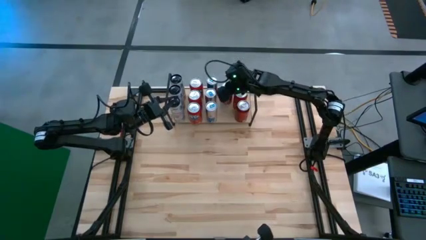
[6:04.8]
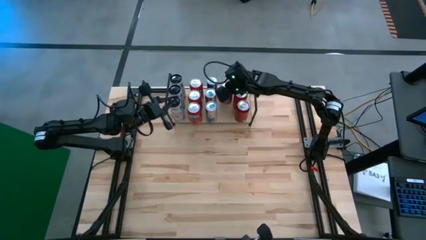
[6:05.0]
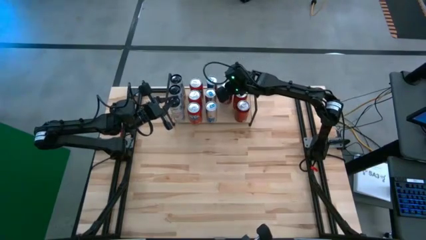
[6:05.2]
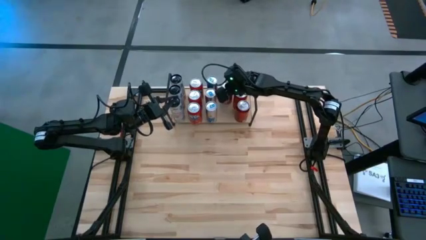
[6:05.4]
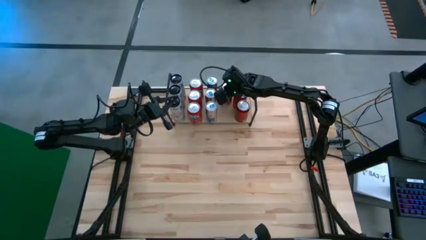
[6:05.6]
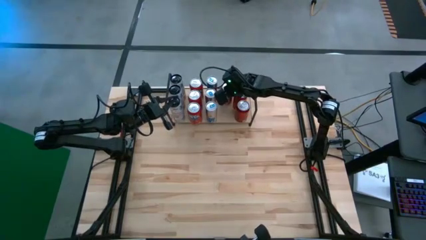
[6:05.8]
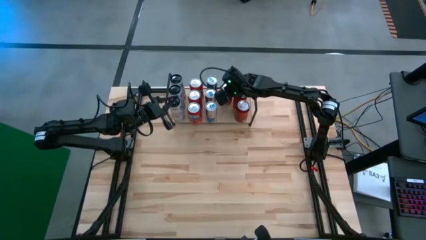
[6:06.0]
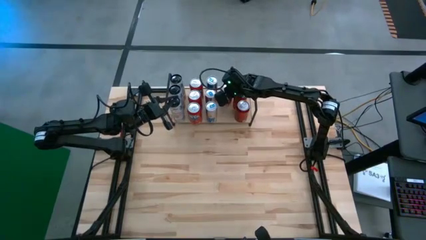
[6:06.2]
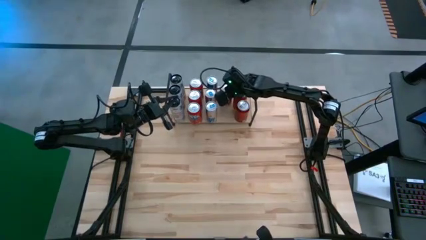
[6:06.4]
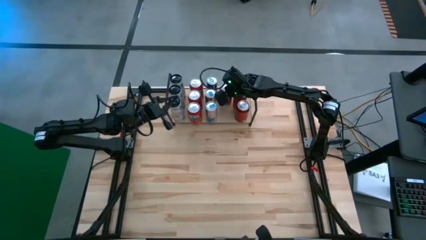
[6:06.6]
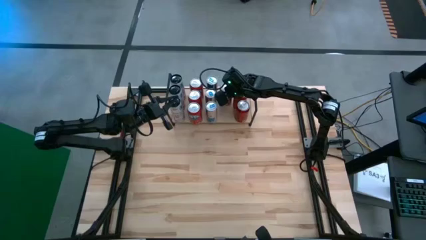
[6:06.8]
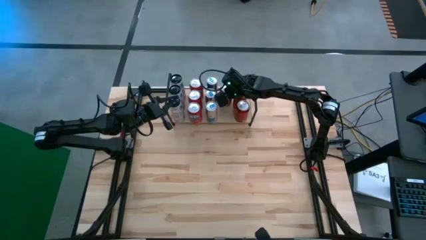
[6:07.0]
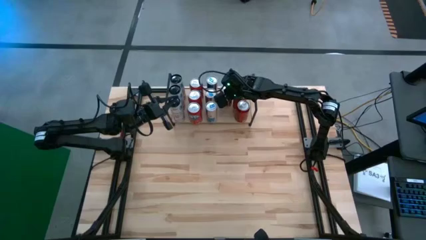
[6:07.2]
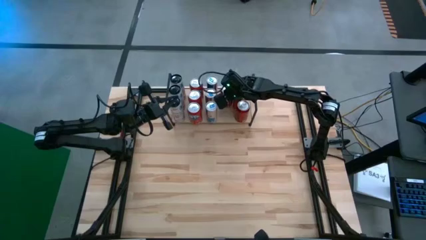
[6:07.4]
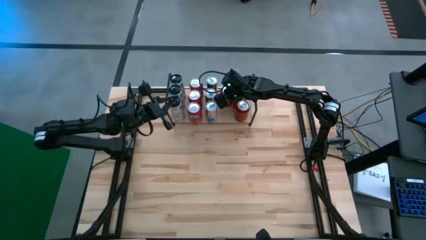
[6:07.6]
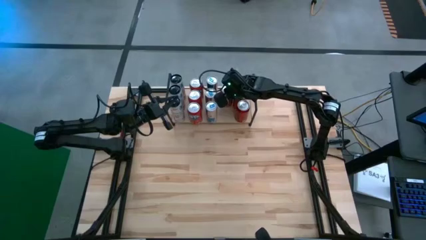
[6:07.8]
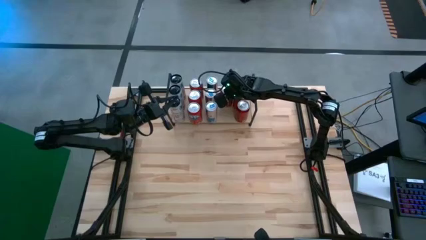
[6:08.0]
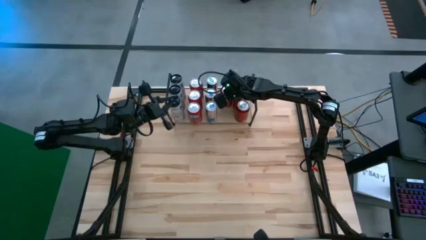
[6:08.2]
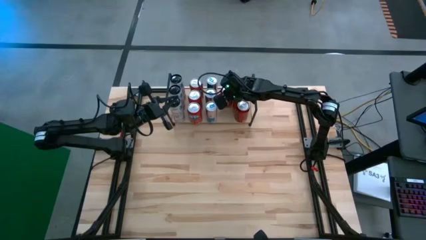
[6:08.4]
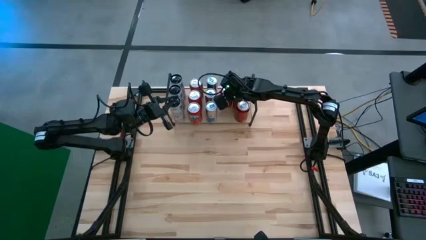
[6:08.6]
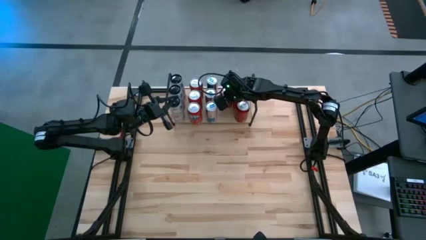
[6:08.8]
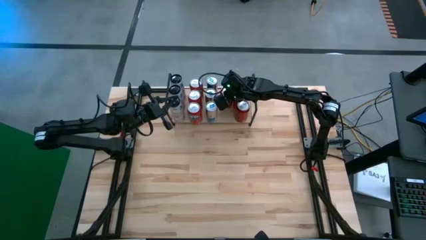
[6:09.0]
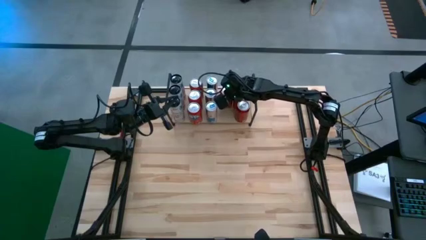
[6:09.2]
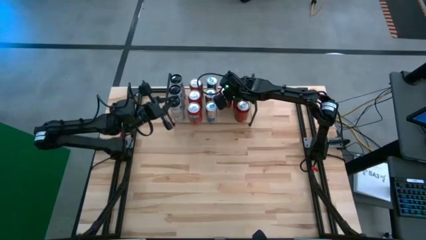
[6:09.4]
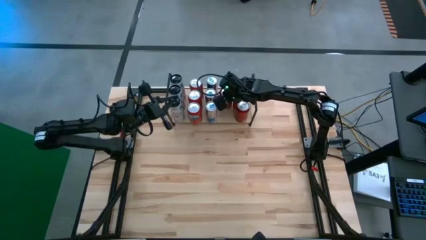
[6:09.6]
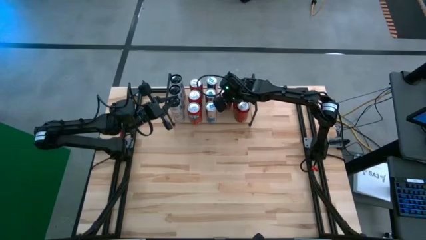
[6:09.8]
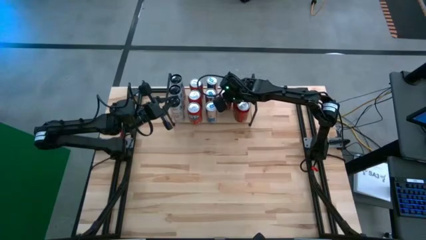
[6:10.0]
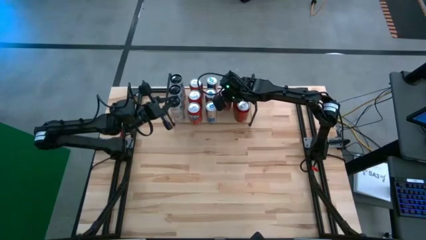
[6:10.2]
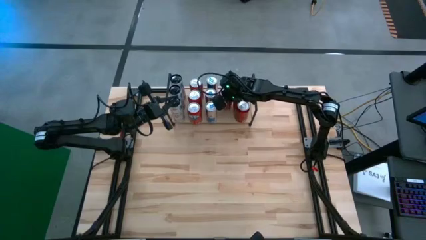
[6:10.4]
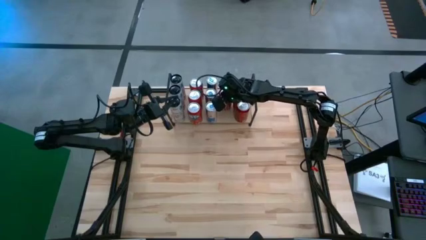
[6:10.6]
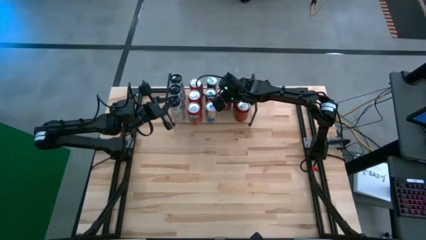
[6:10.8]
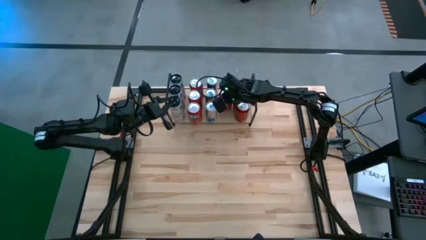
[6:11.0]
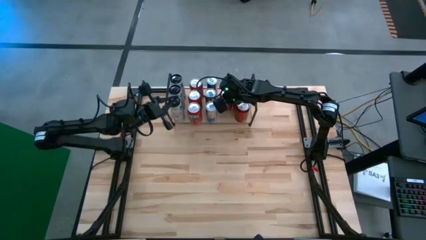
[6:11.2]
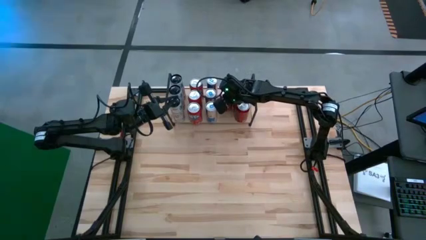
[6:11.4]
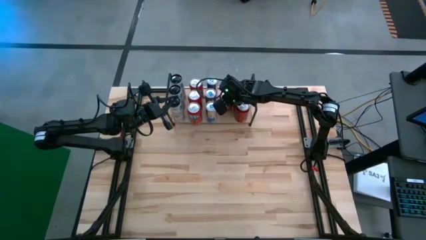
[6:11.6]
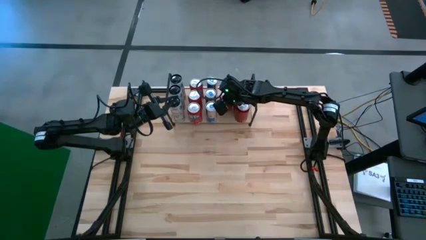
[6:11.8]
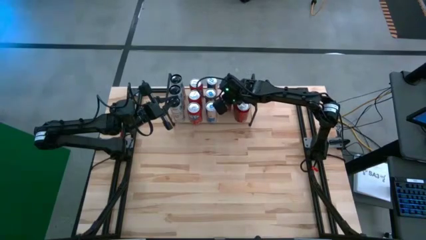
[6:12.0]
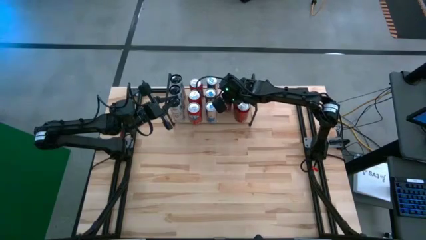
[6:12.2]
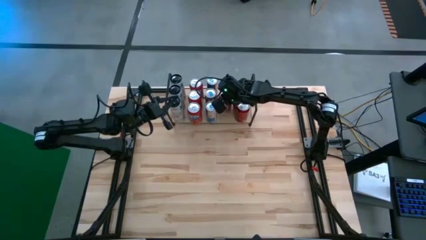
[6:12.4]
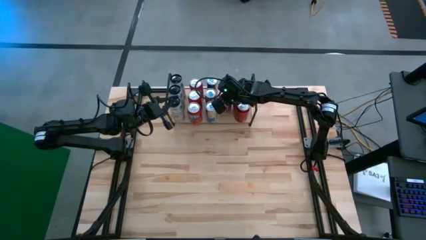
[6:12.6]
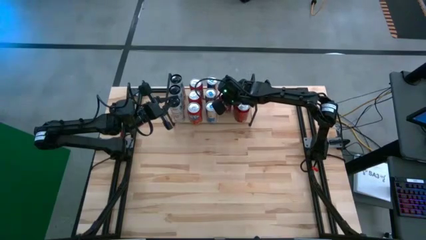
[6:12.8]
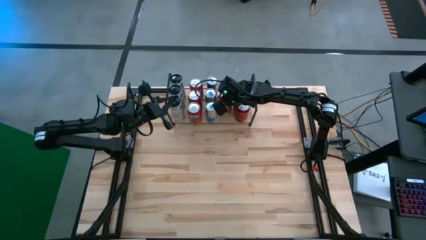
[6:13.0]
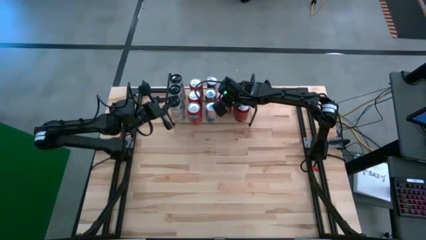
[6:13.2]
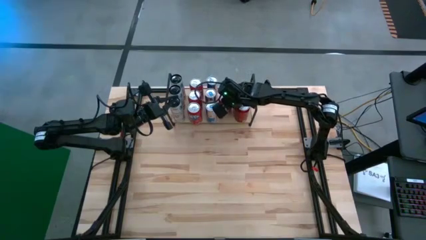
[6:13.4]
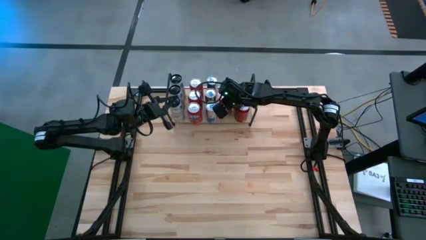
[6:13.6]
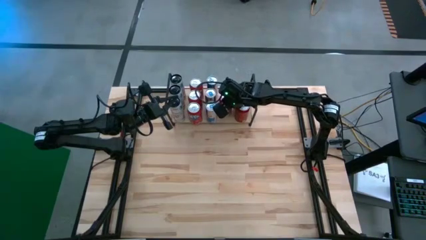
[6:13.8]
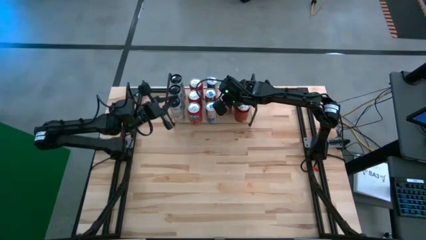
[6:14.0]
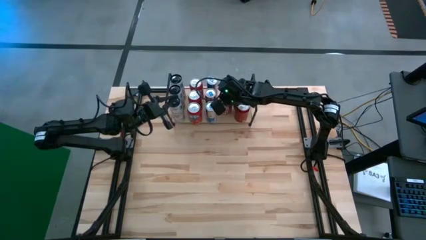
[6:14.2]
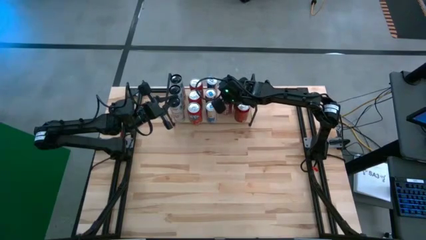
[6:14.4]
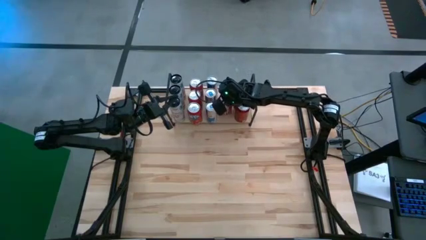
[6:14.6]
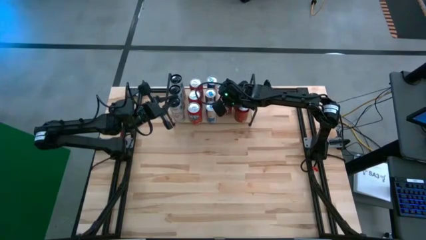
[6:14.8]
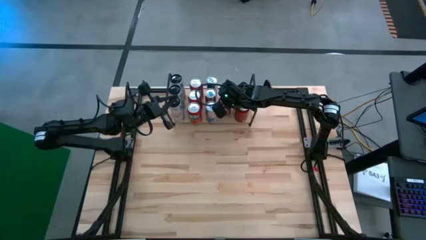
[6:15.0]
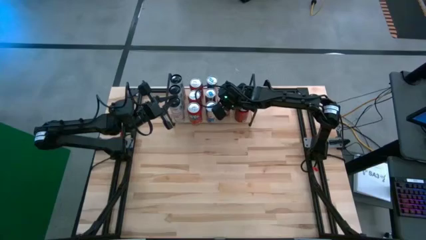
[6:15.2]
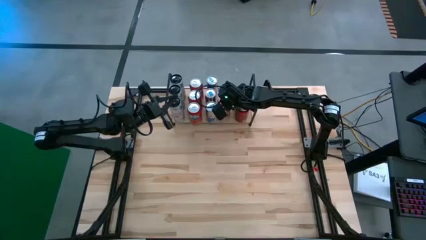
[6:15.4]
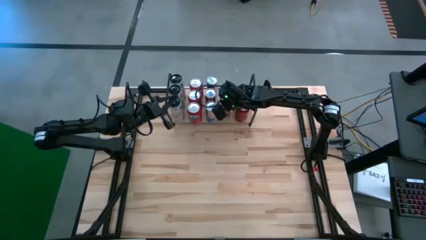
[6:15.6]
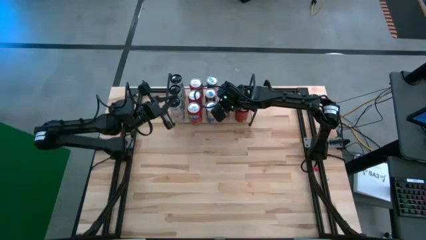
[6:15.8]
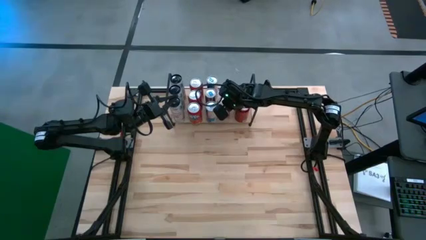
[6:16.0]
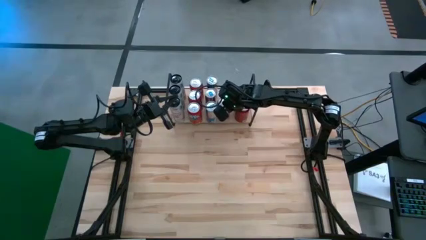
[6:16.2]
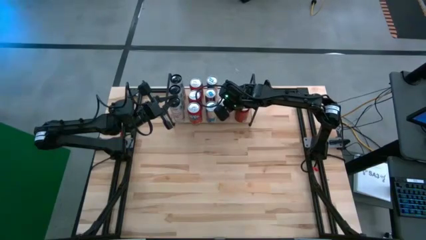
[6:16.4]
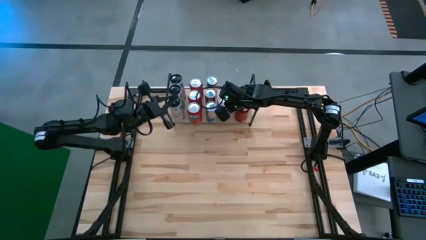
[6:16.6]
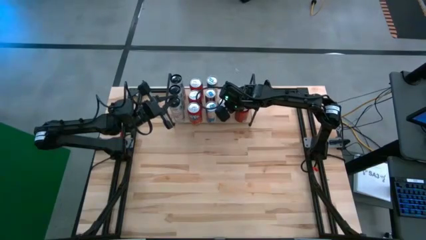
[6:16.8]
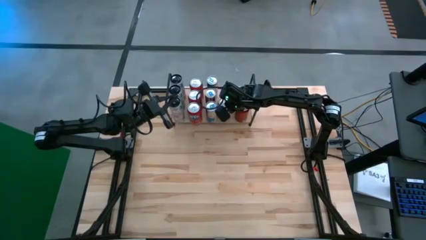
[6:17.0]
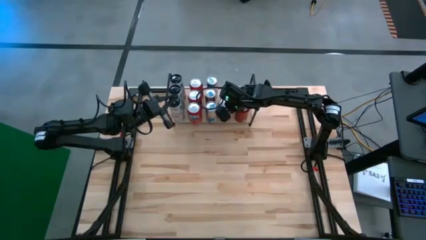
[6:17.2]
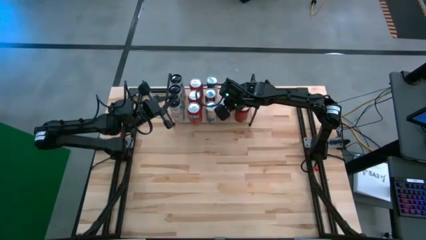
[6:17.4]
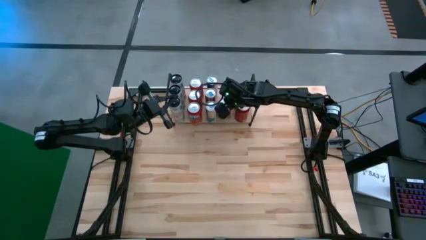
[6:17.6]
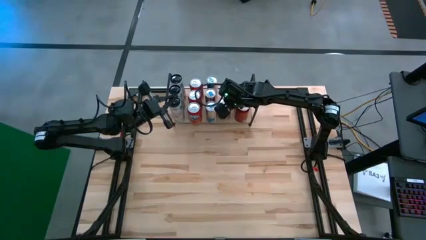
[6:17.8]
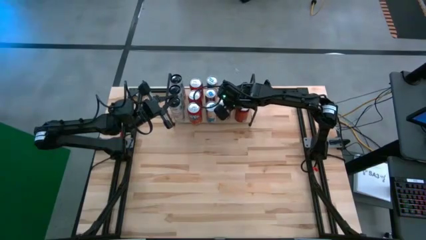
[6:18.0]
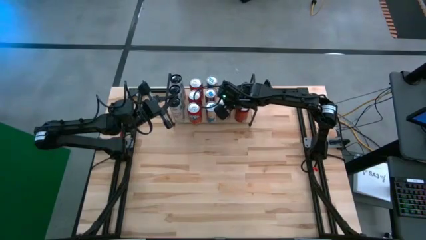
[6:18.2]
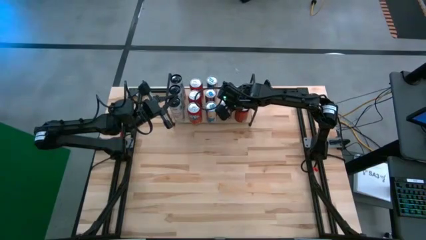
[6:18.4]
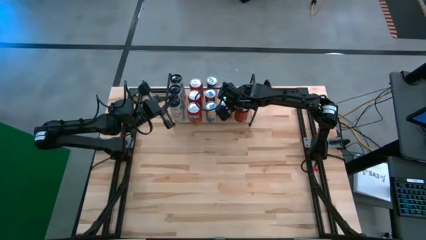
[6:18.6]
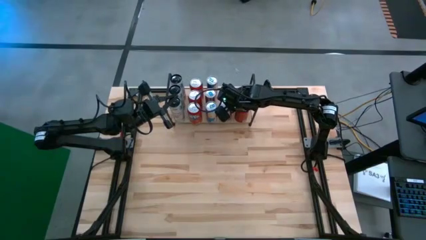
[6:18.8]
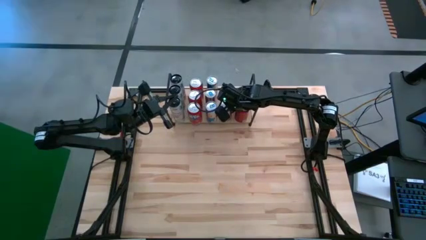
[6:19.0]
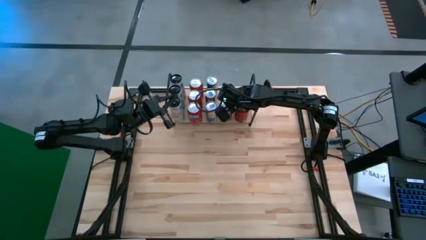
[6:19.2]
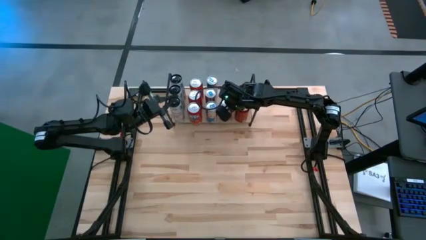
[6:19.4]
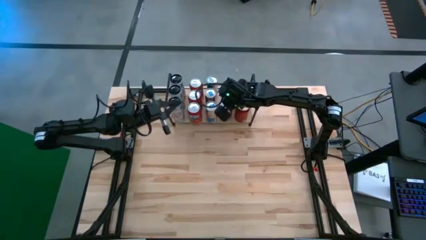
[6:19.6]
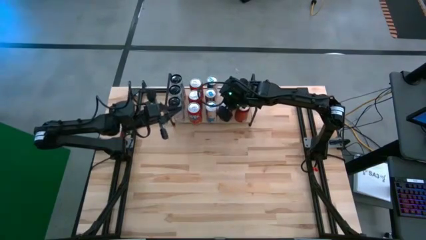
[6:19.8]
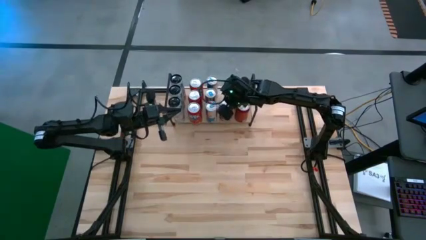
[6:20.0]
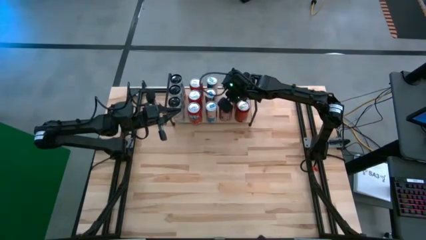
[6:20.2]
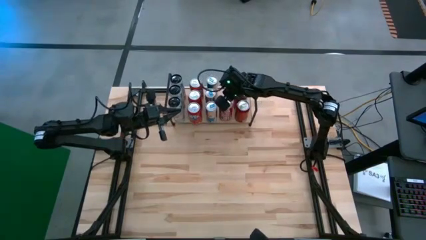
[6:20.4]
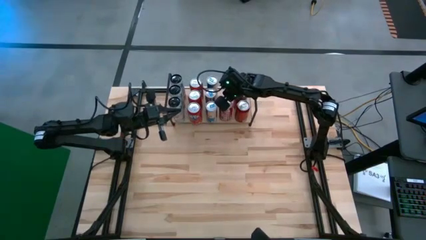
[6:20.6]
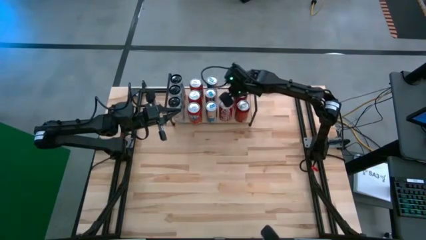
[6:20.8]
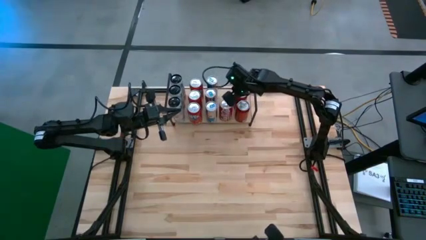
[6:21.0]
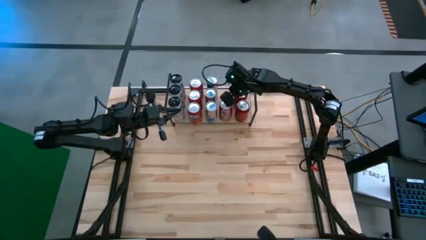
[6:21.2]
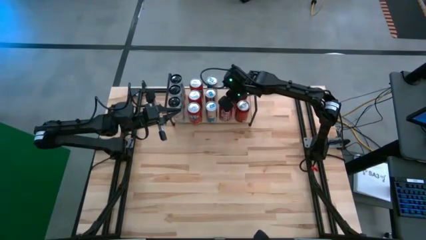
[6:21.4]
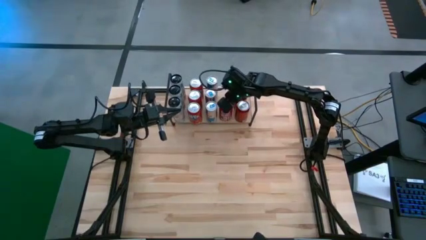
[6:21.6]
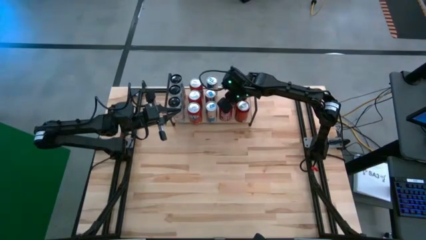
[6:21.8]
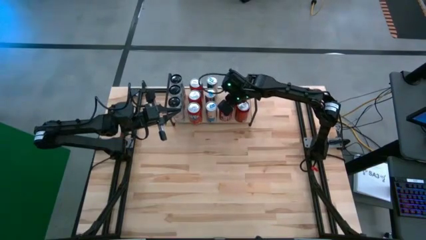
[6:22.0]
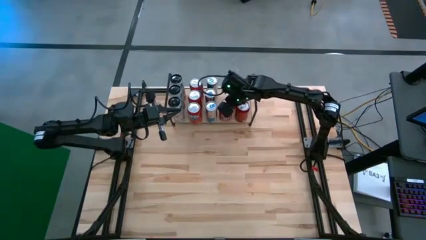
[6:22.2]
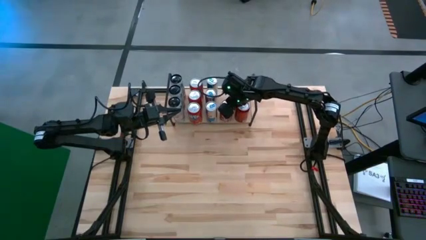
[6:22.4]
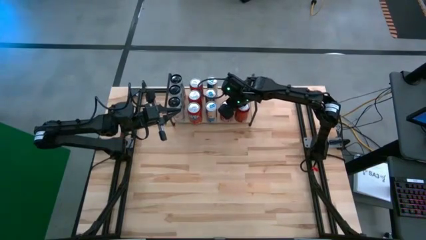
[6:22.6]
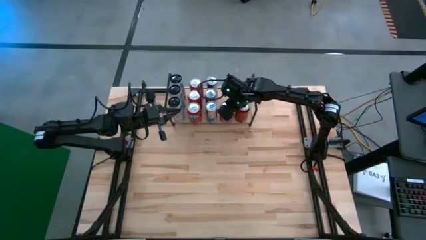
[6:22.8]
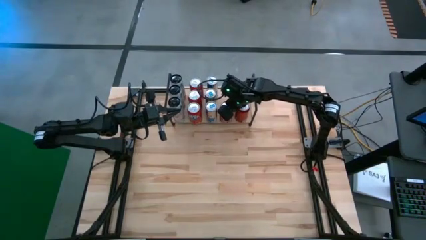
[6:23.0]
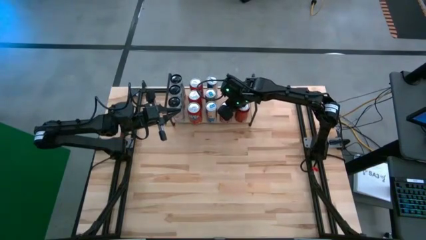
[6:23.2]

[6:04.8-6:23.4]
Task: Place canned beverage on shelf
Put the red soda on the shelf aligned with the other red soda cans
